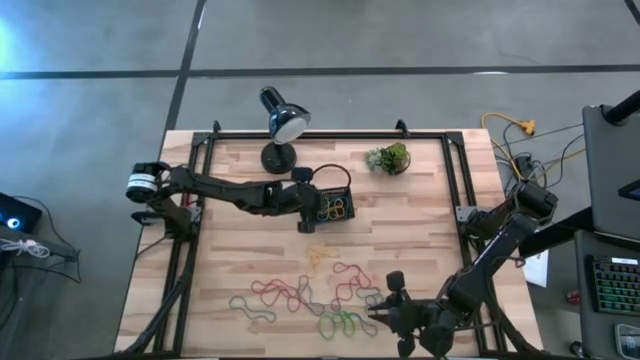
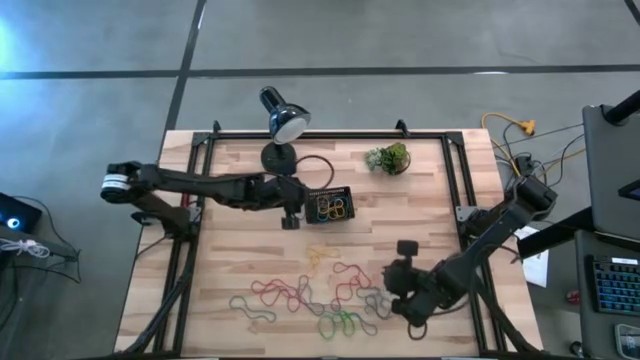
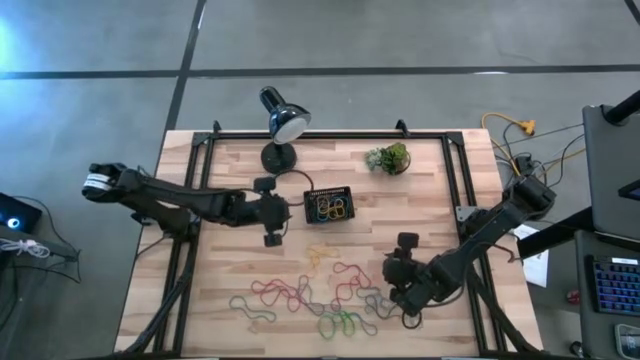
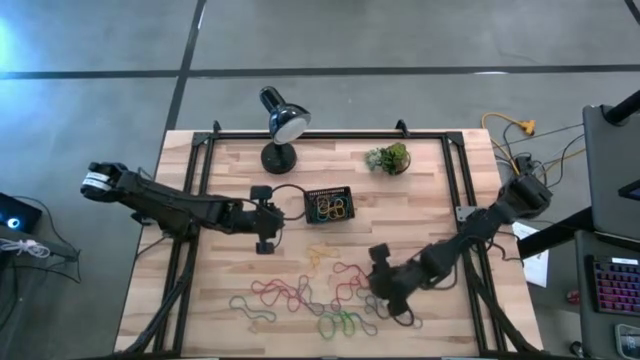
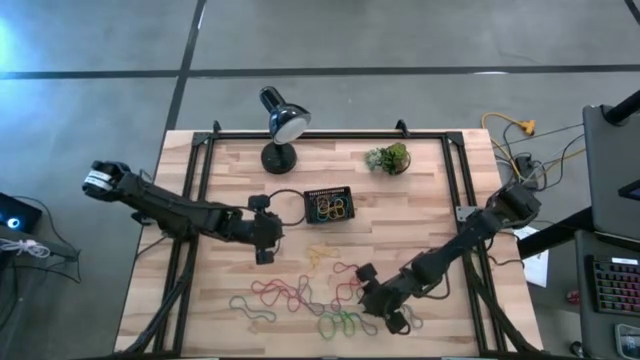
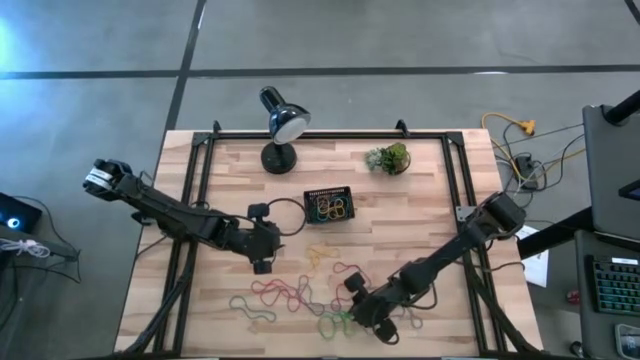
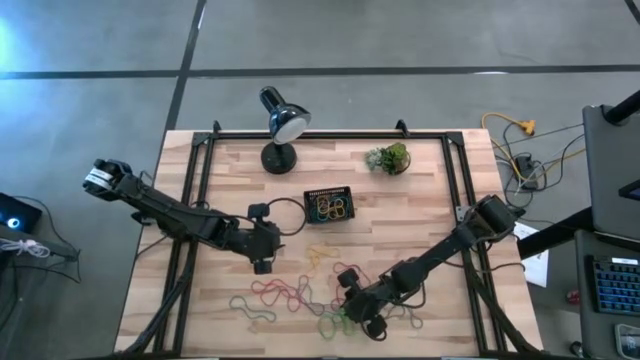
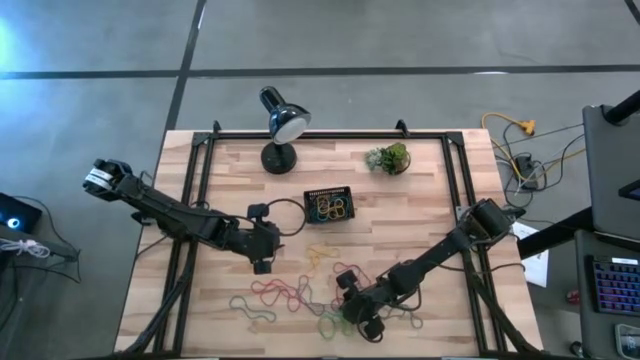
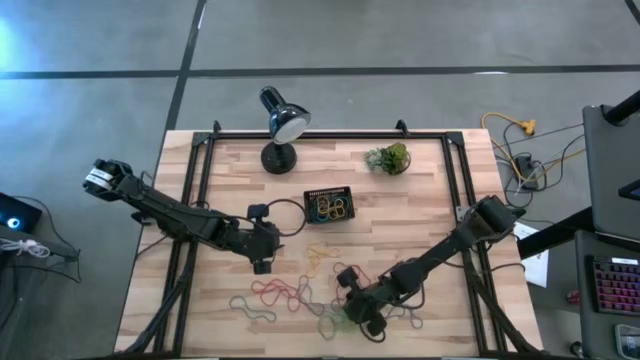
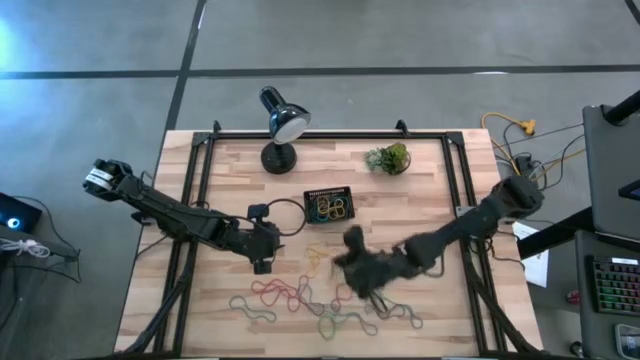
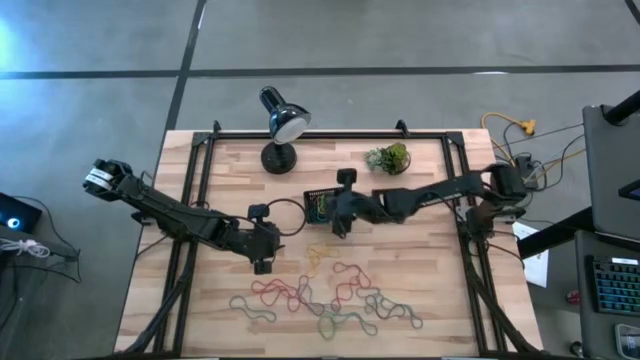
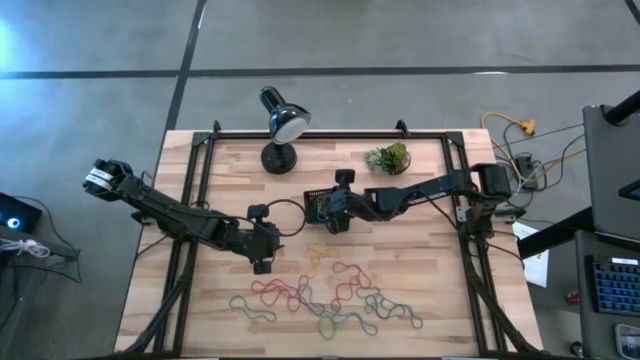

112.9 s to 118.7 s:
Task: Pick and place rubber bands into bin
Put the green rubber band into the black bin

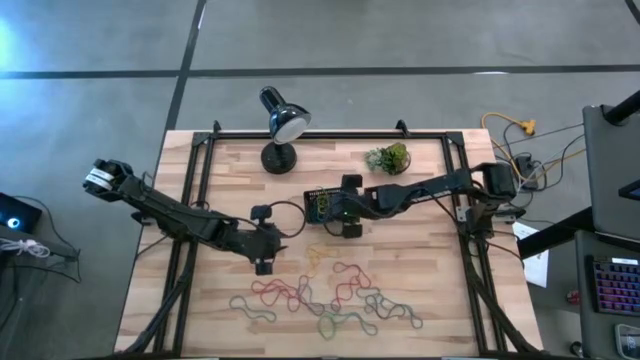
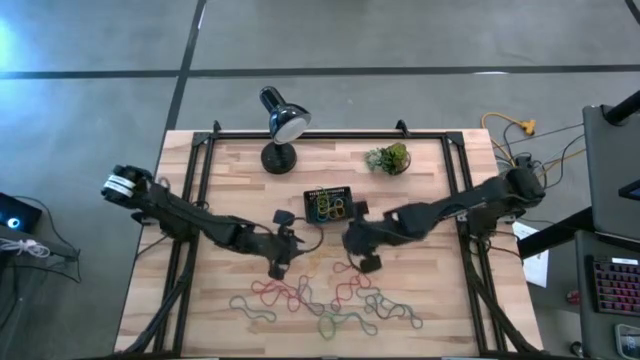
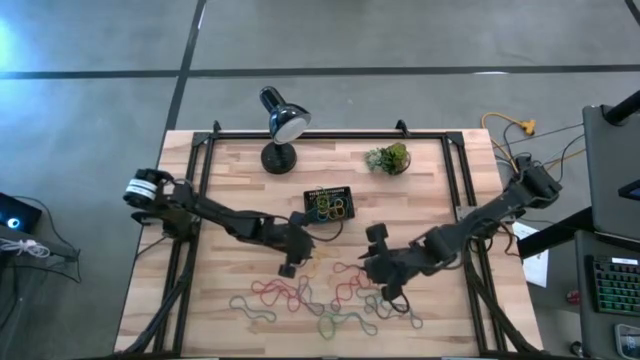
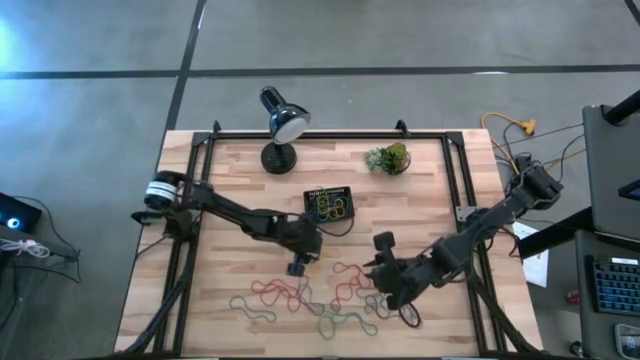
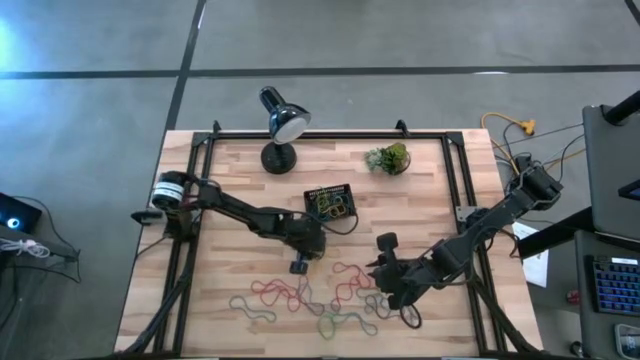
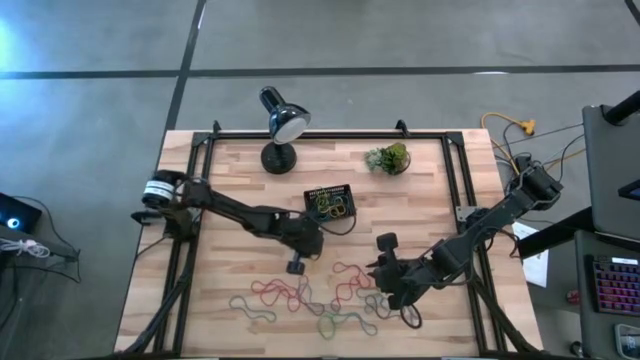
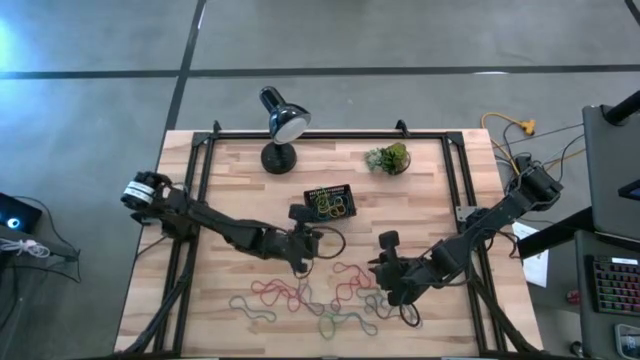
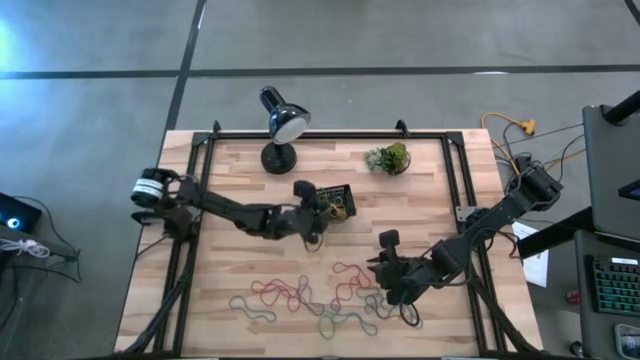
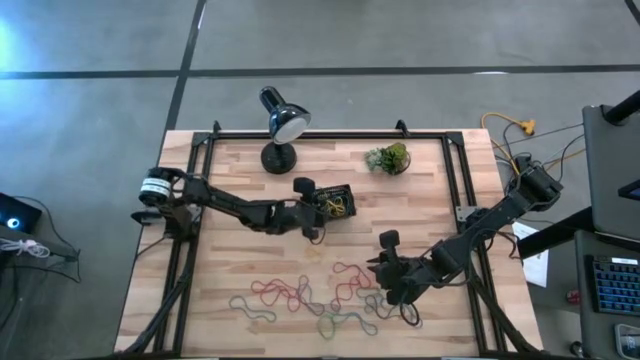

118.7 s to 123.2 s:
Put the yellow rubber band into the black bin

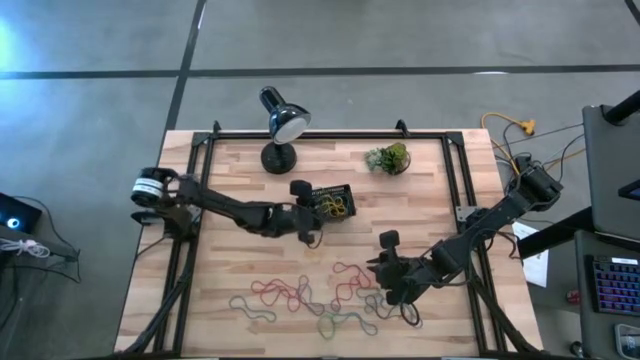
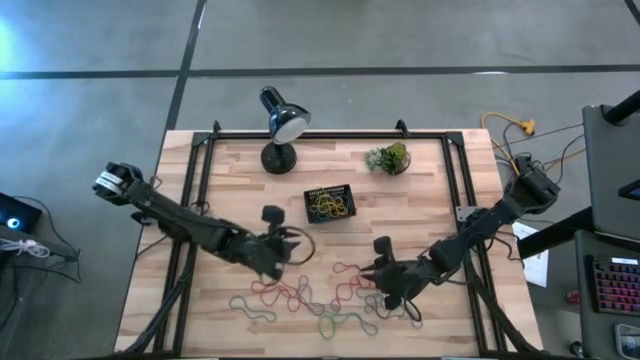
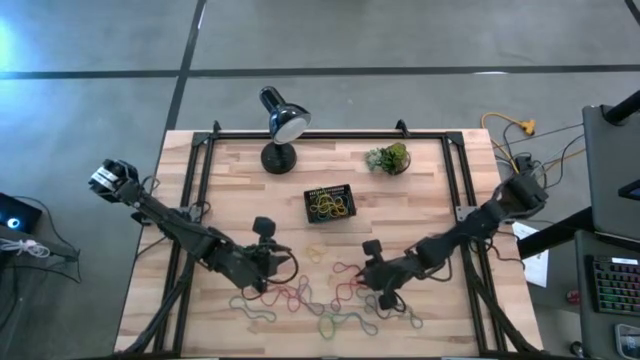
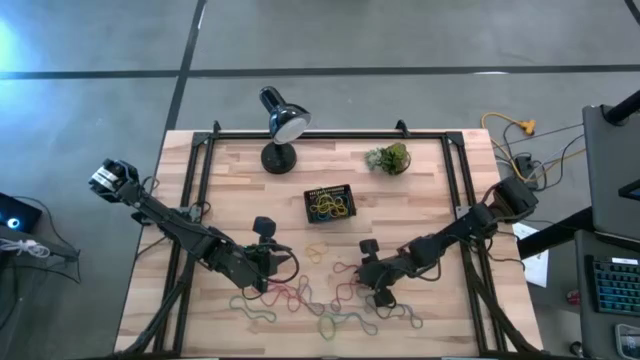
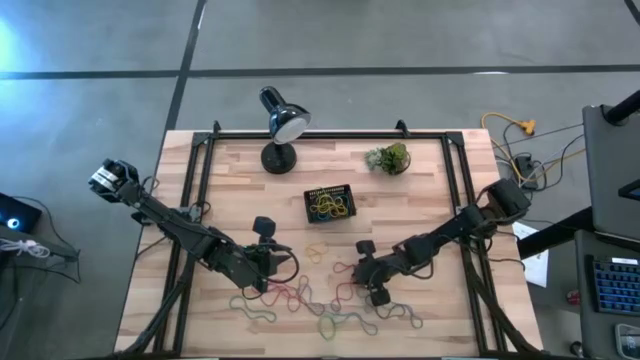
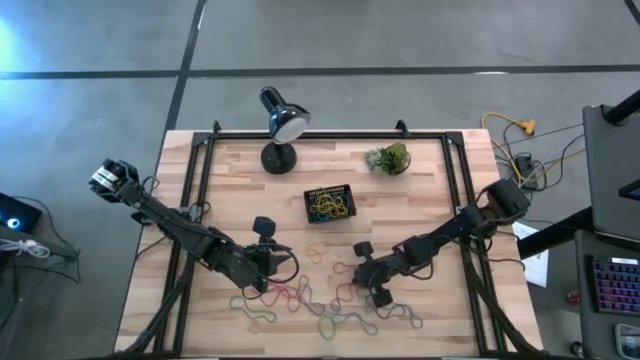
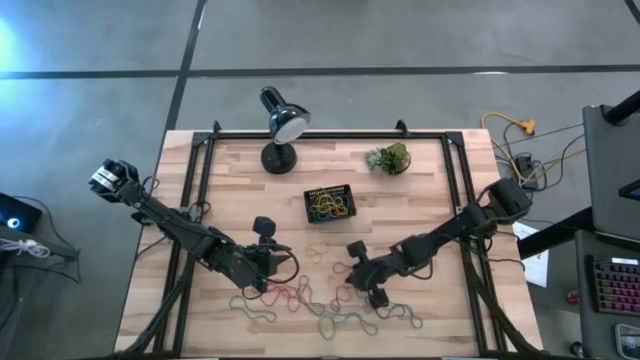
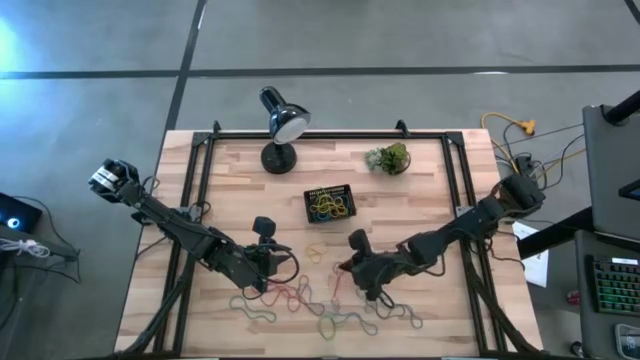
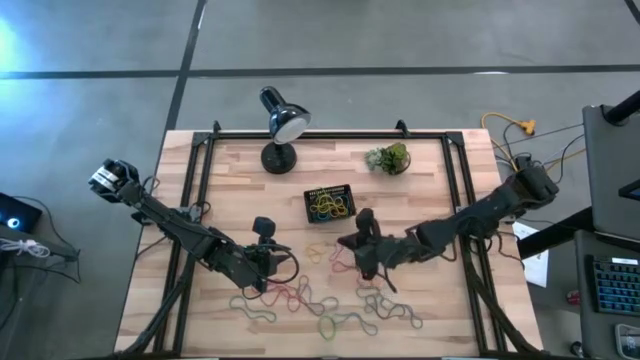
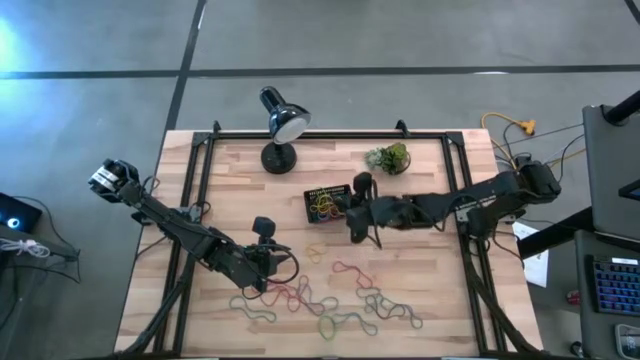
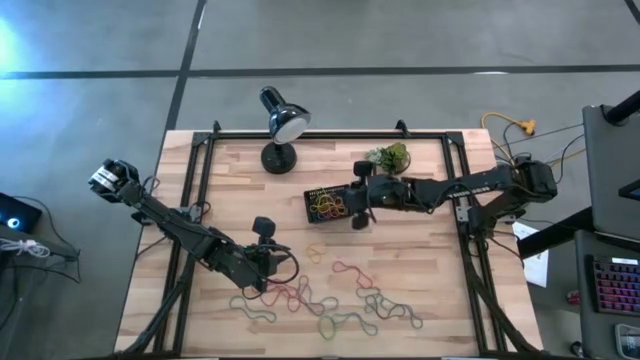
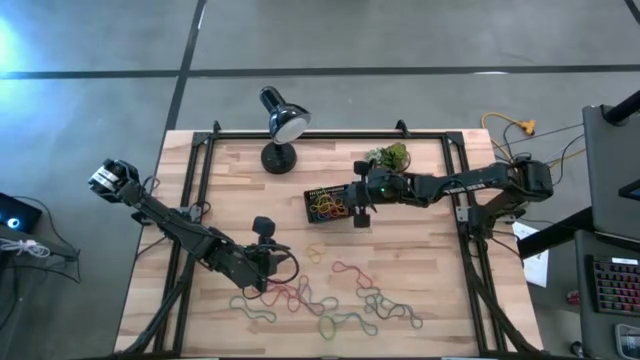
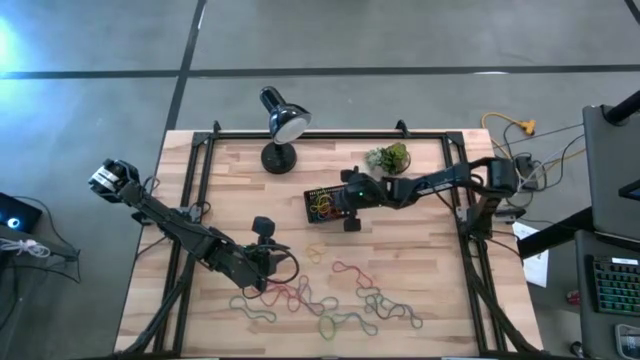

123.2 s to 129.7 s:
Put the red rubber band into the black bin

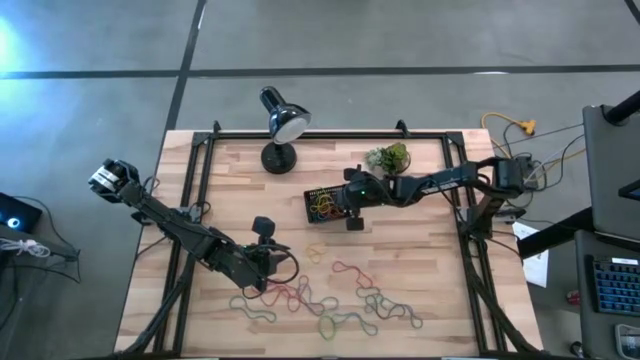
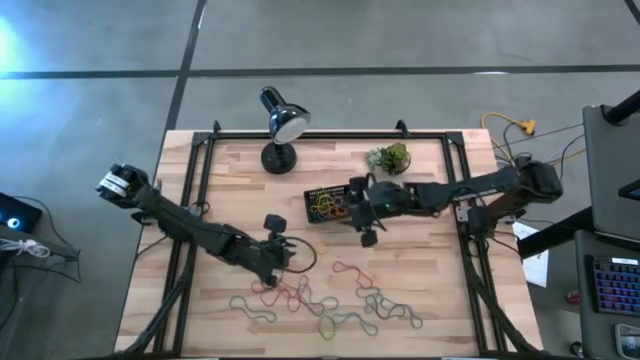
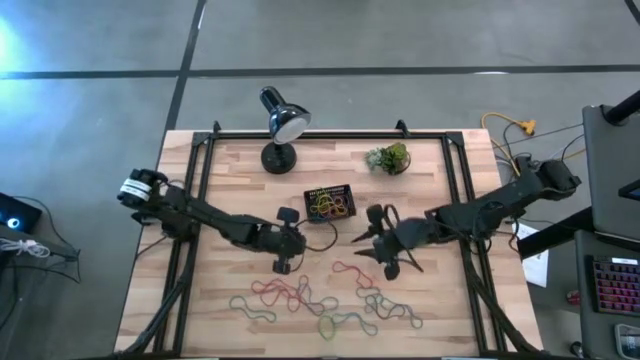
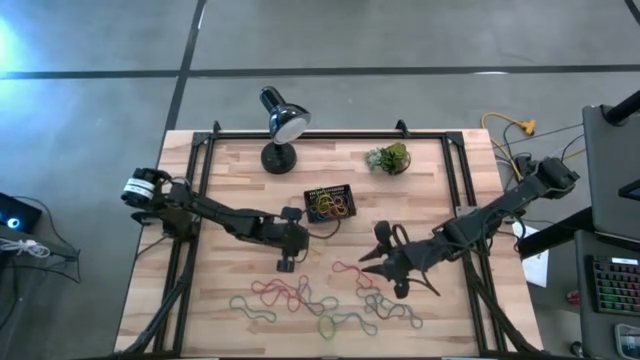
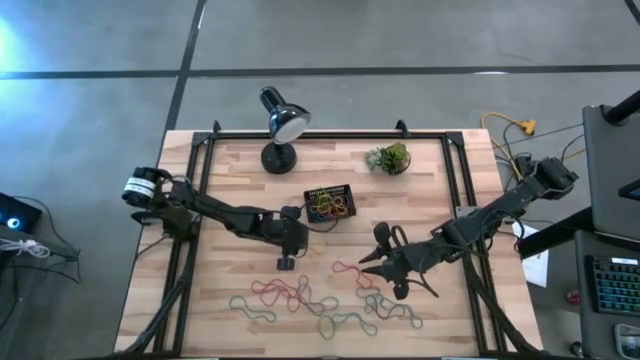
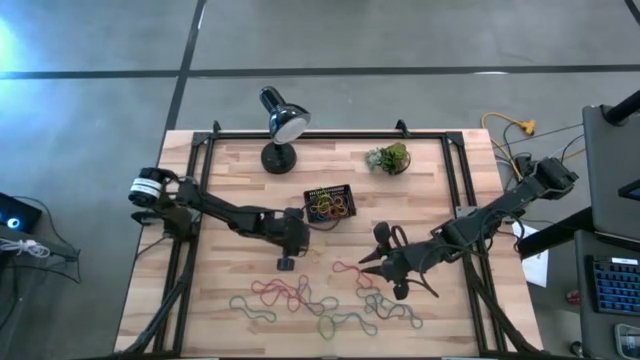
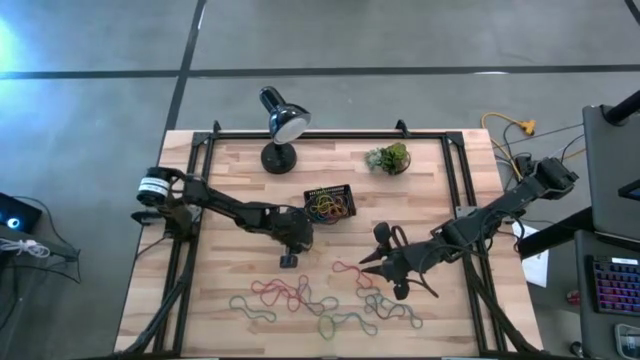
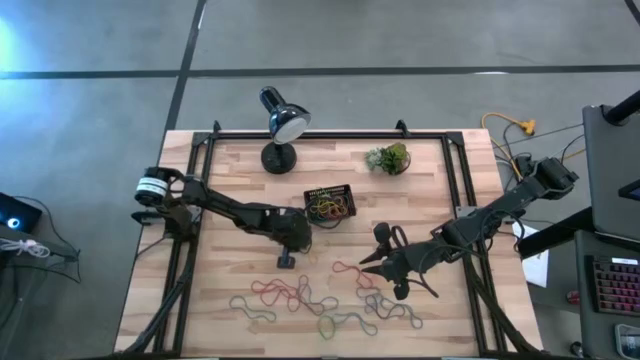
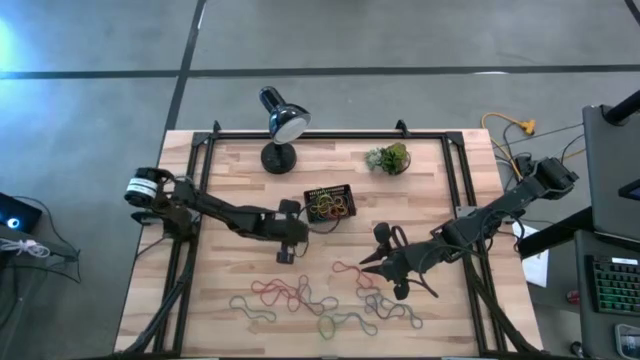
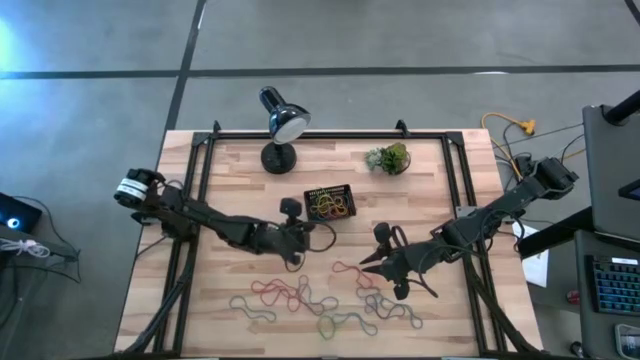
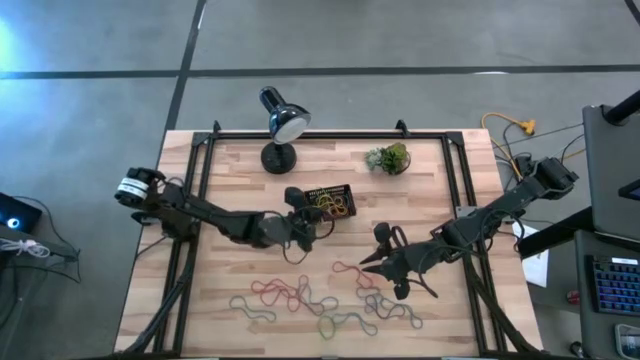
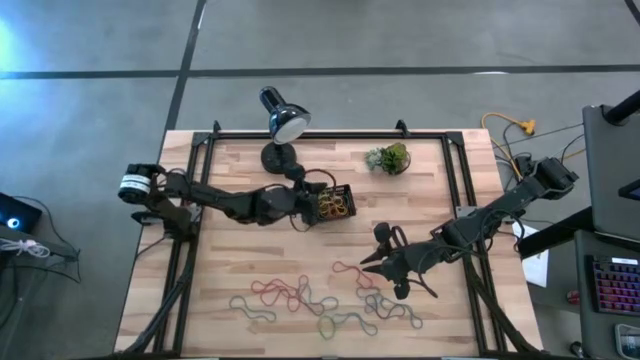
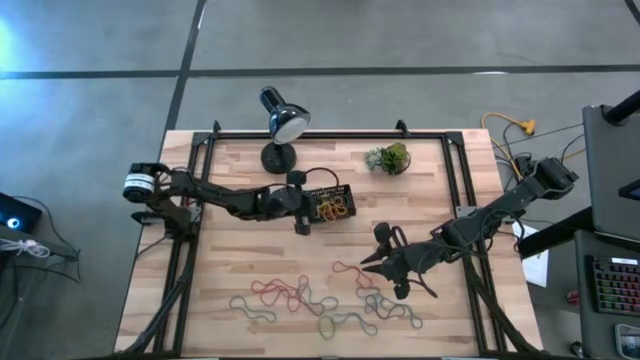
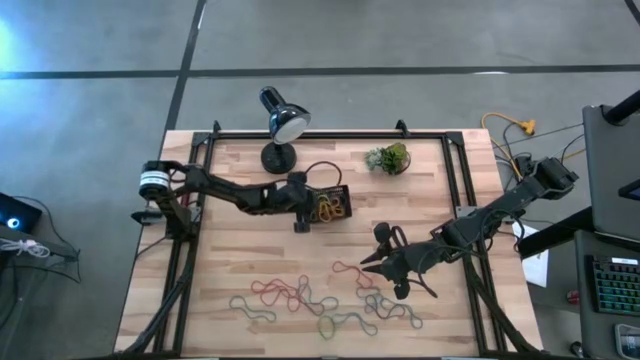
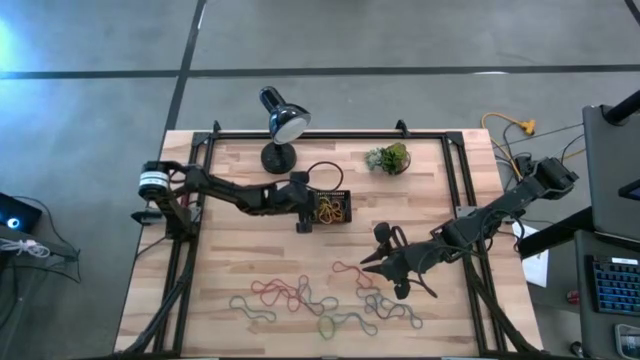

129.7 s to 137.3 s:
Put the yellow rubber band into the black bin
